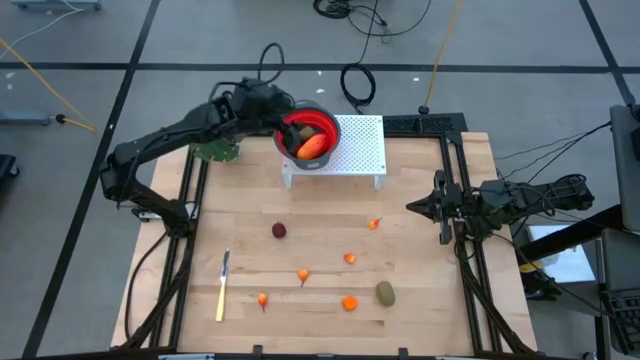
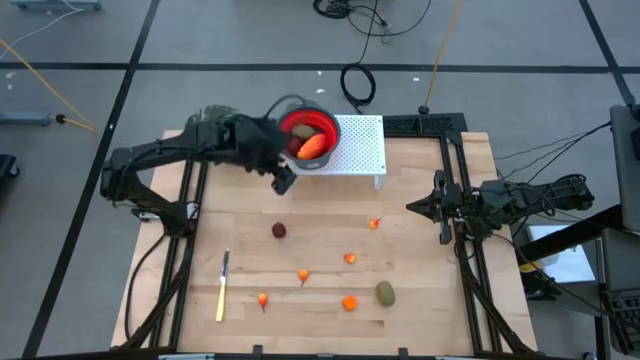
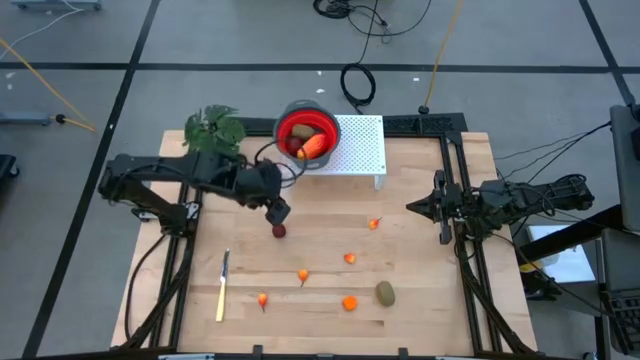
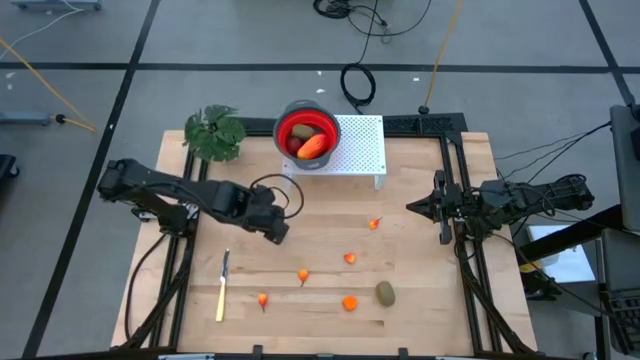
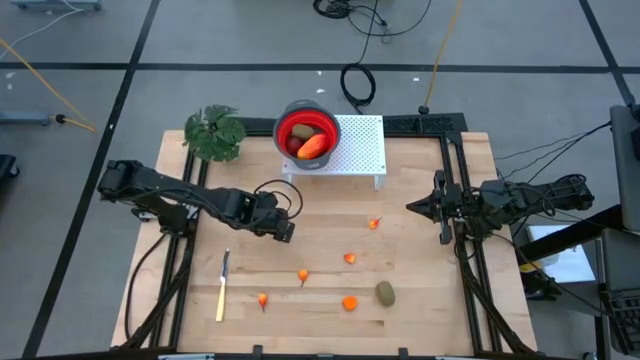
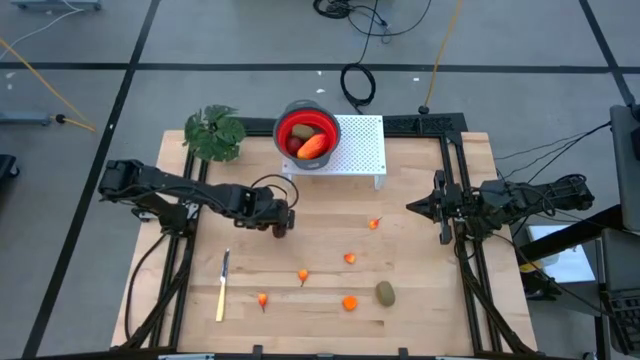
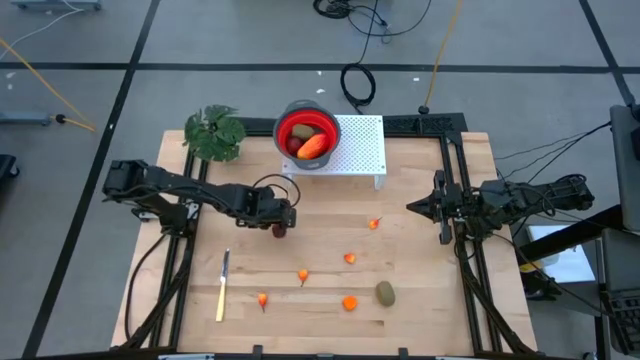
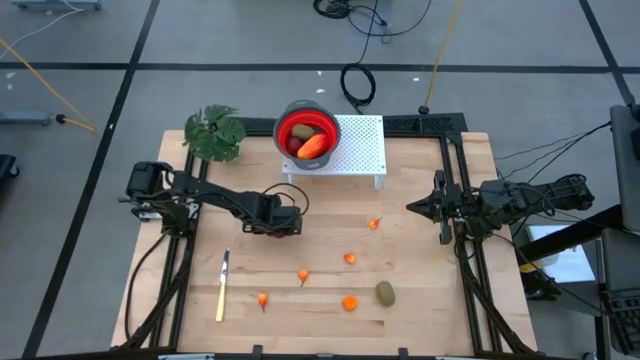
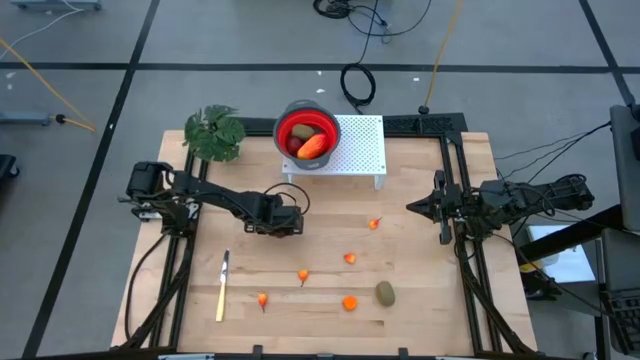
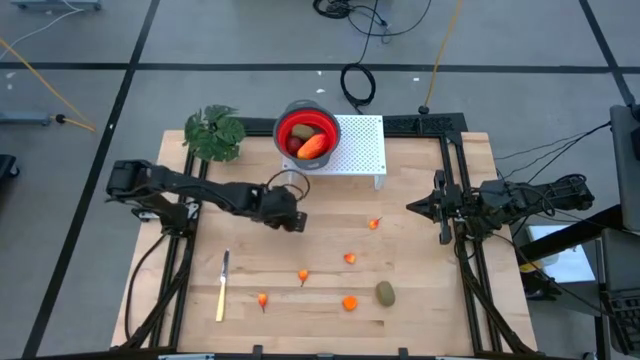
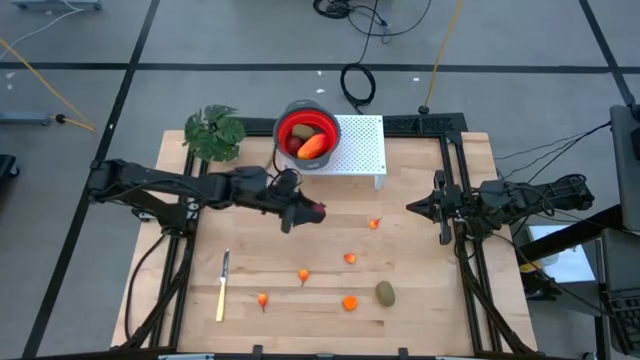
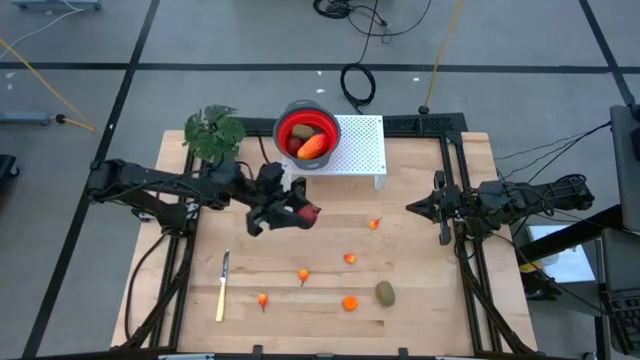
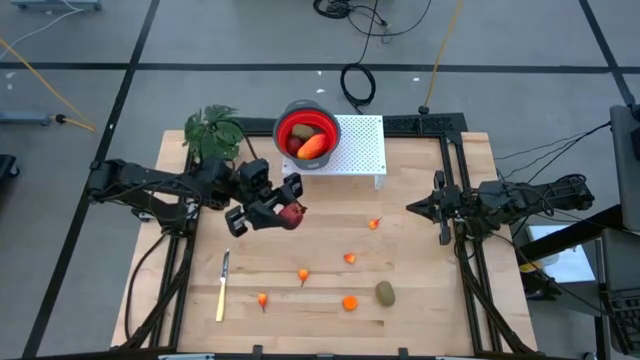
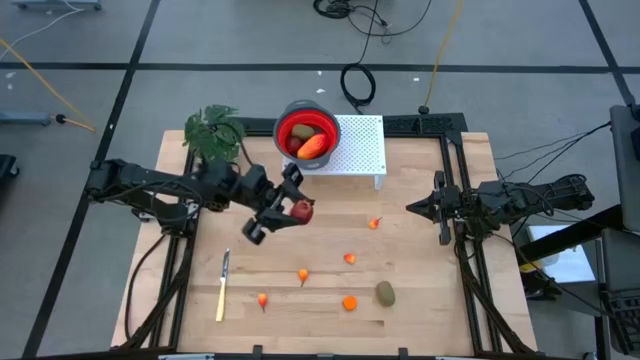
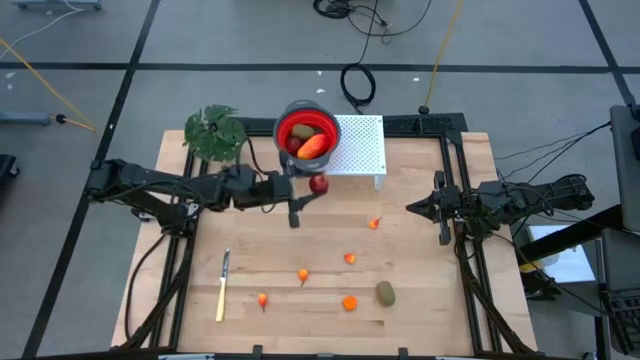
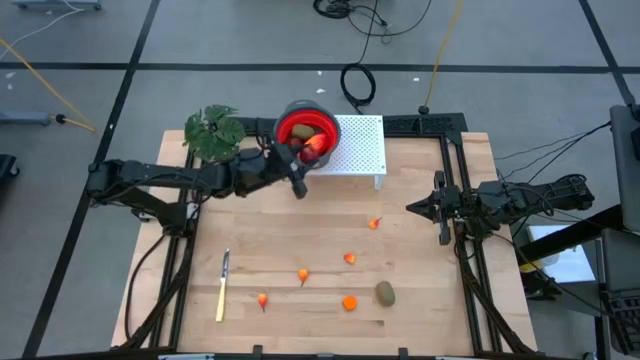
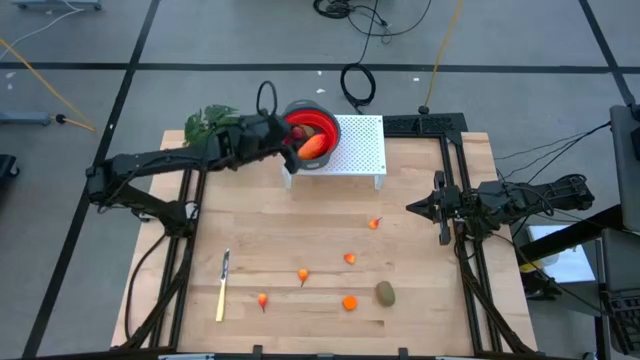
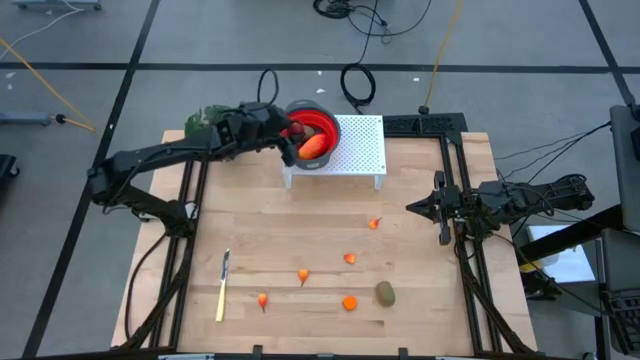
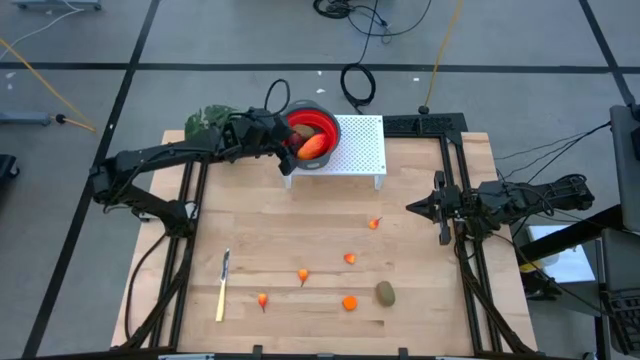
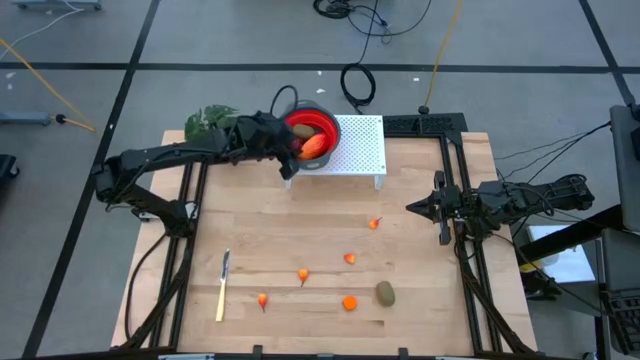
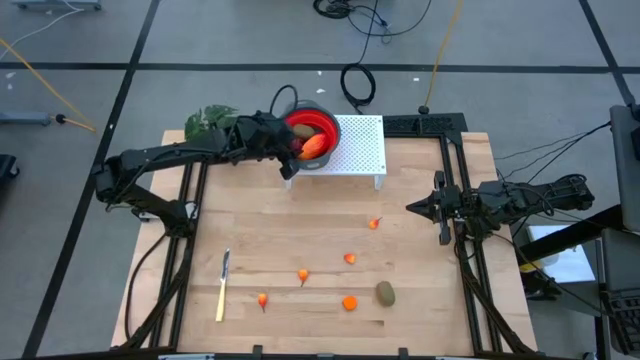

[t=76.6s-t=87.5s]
Task: Pick & Place Fruit
Put the pomegranate into the red strainer bowl on the shelf

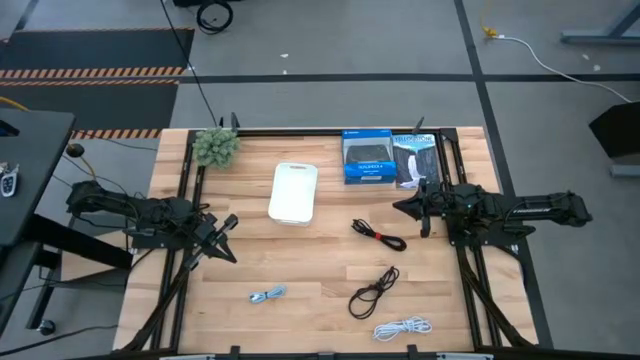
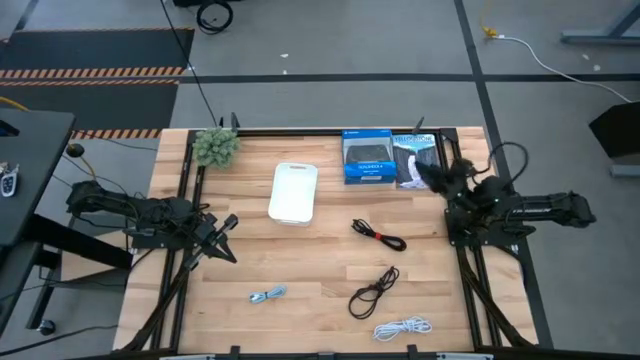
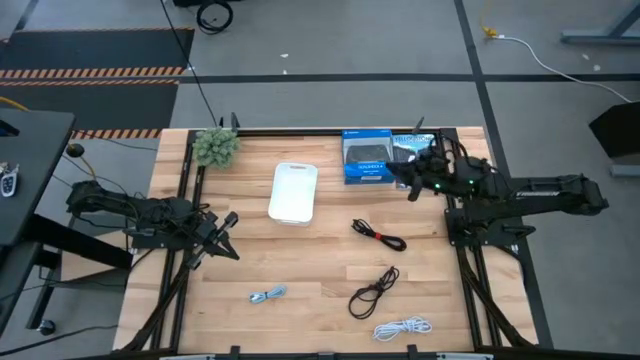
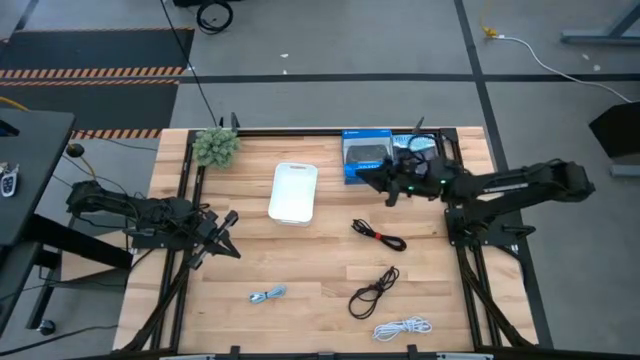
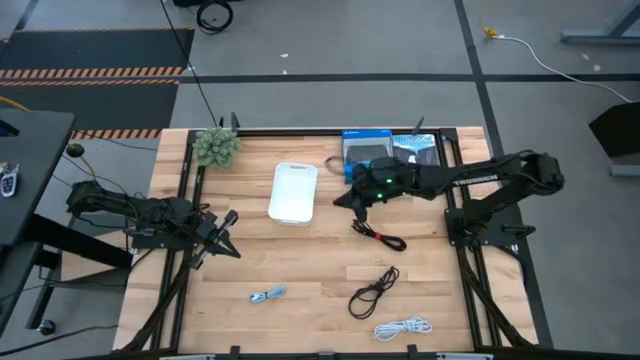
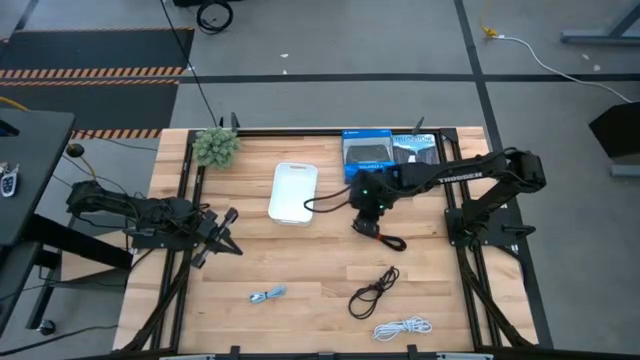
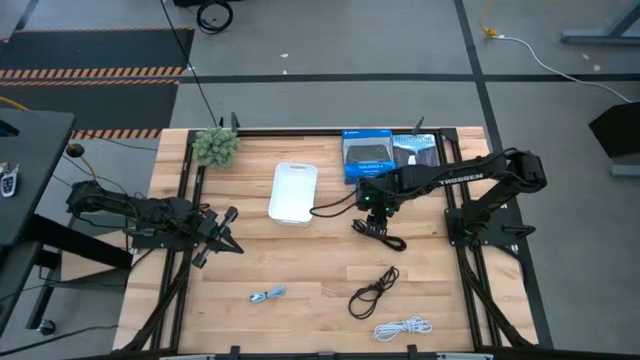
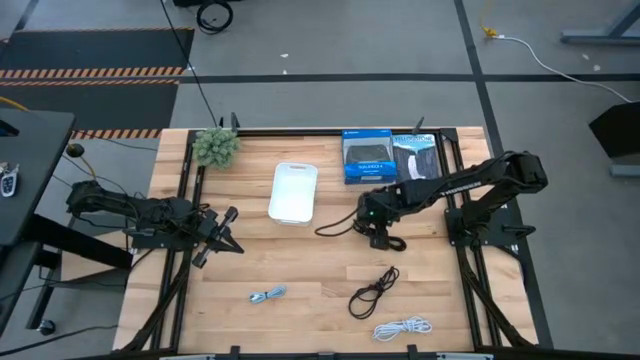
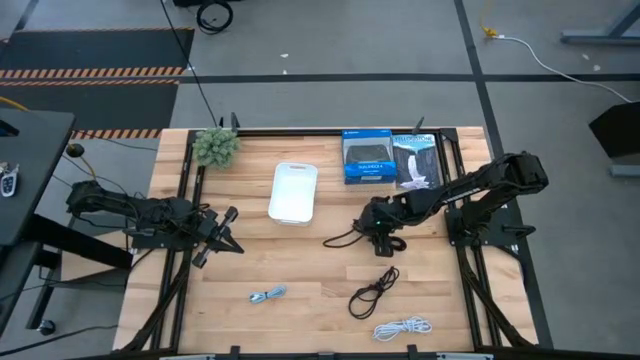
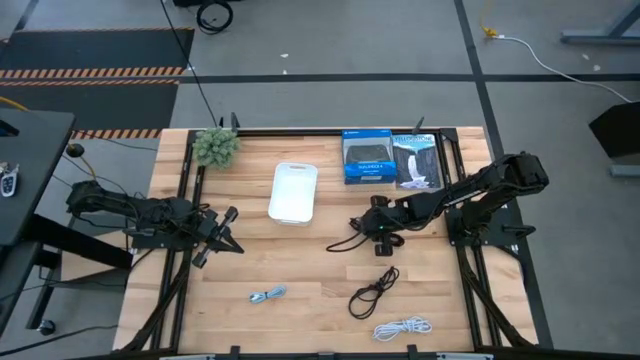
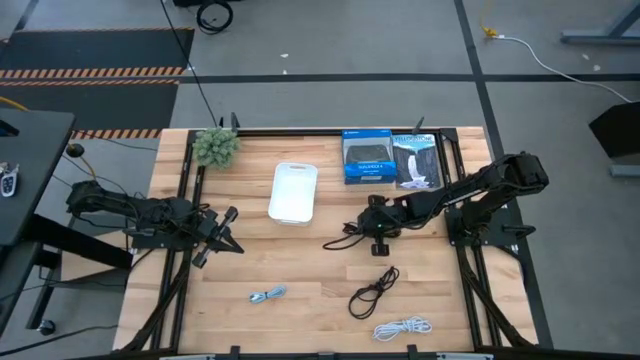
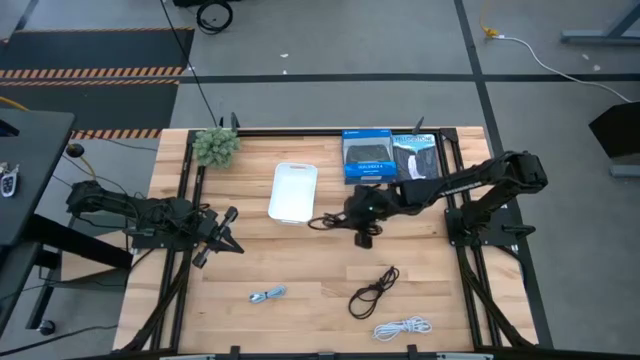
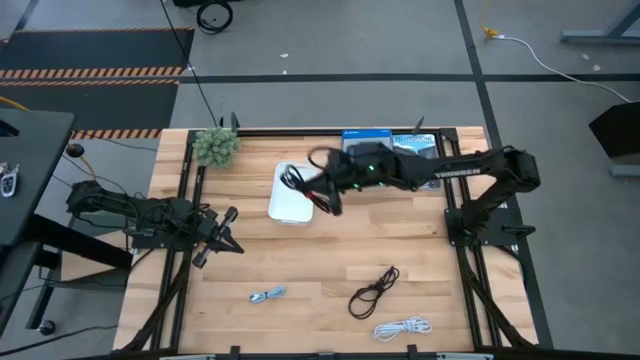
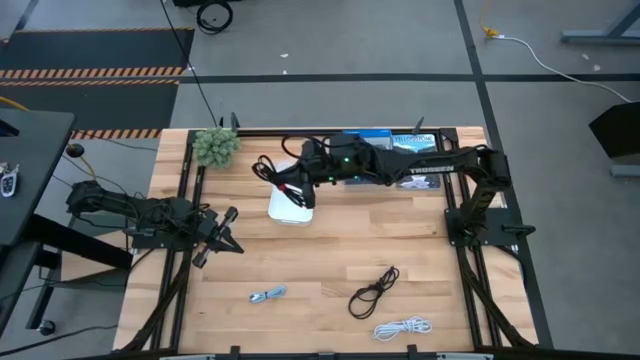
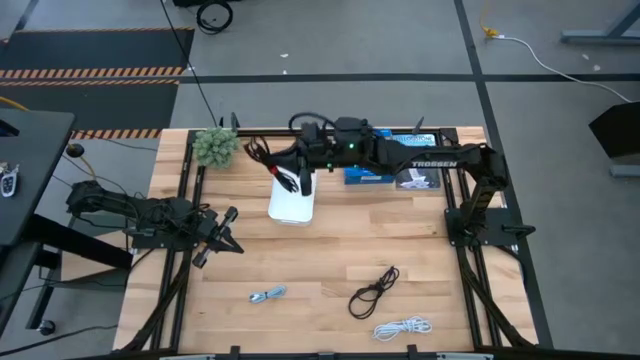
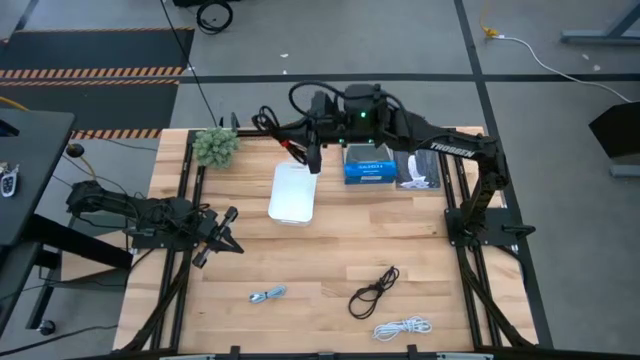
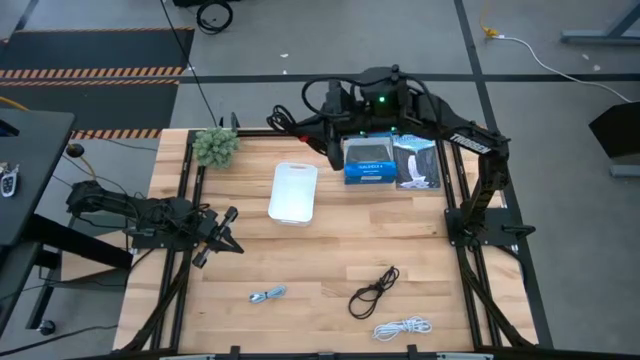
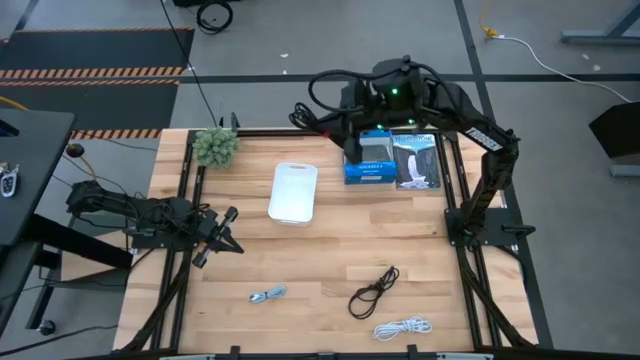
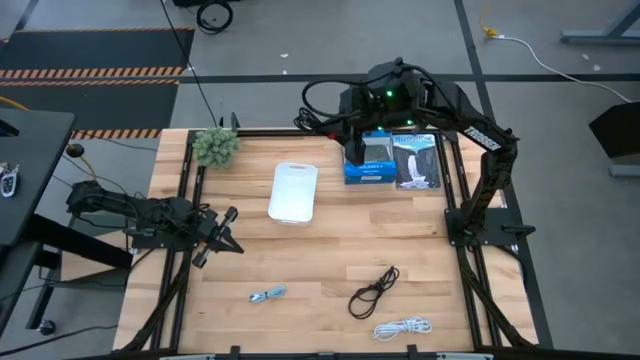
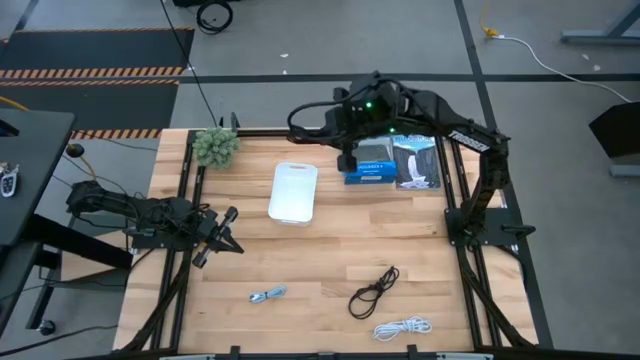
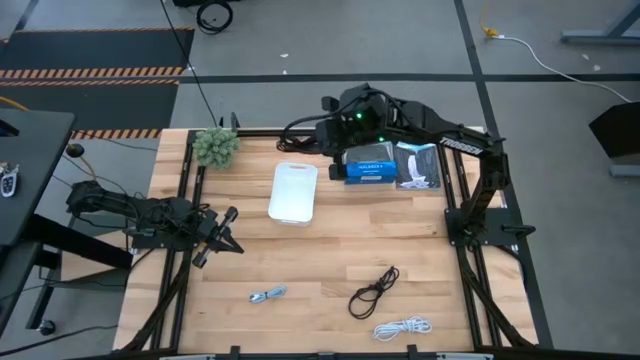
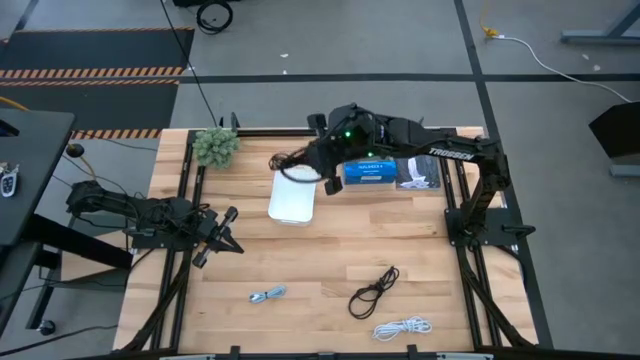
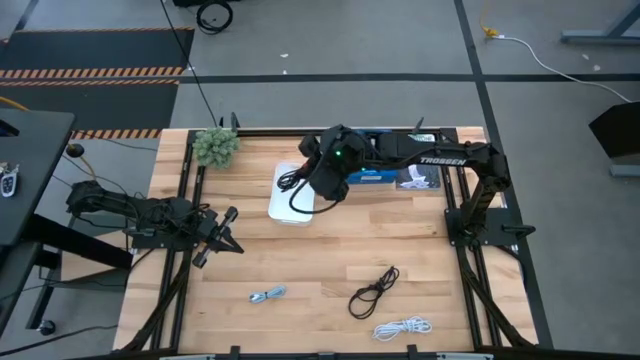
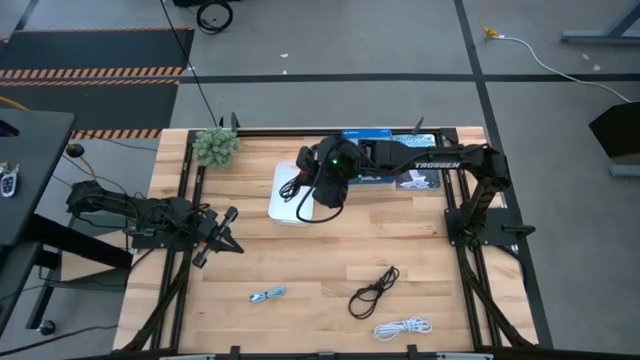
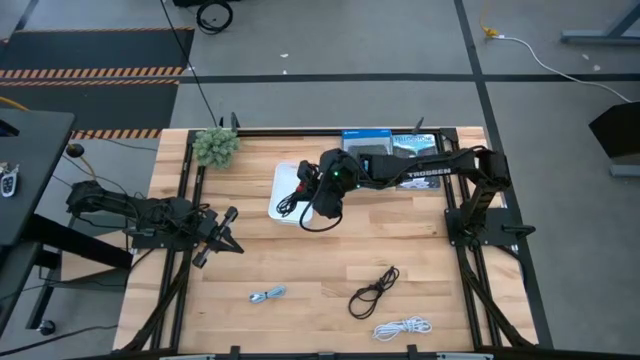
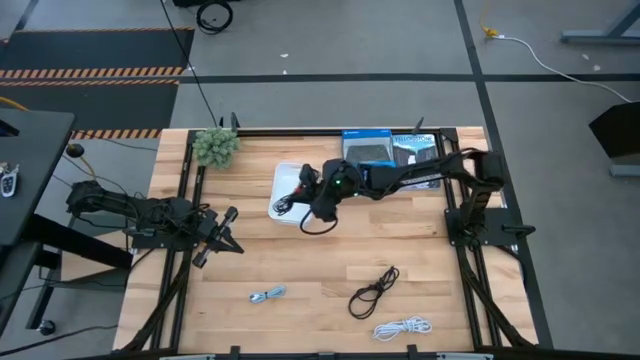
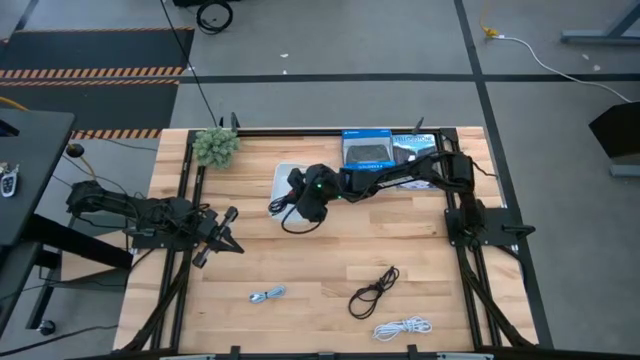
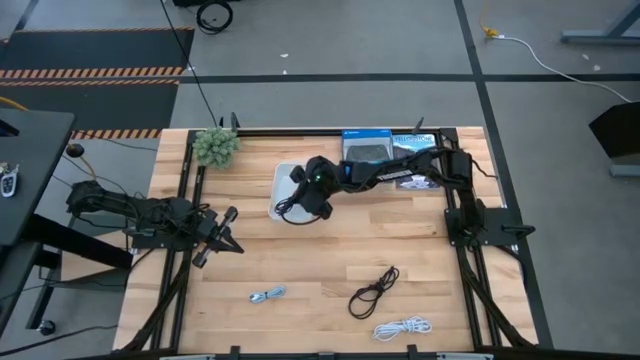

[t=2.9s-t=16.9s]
Task: Pick and place USB-C Cables
Put the top black charger cable into the white bin
